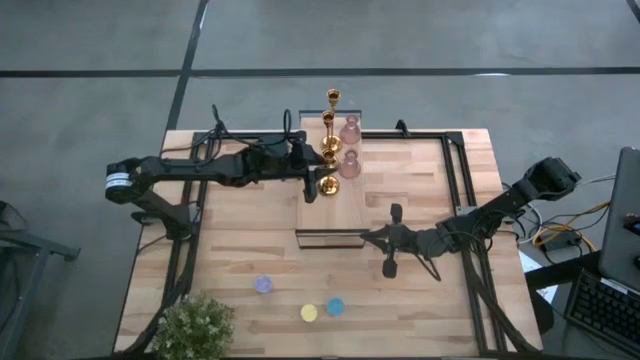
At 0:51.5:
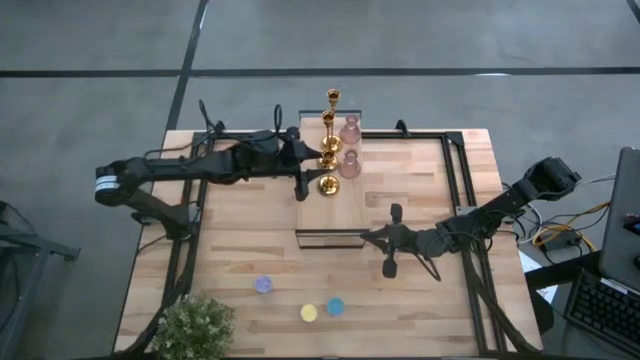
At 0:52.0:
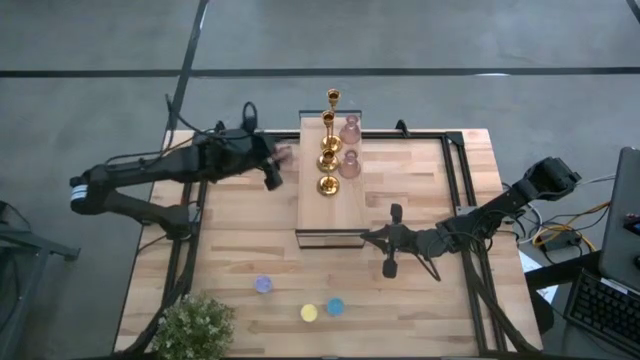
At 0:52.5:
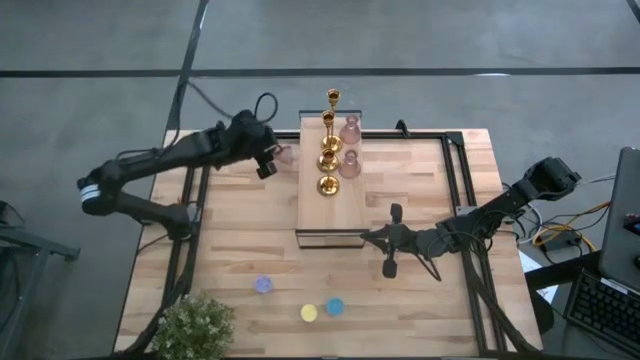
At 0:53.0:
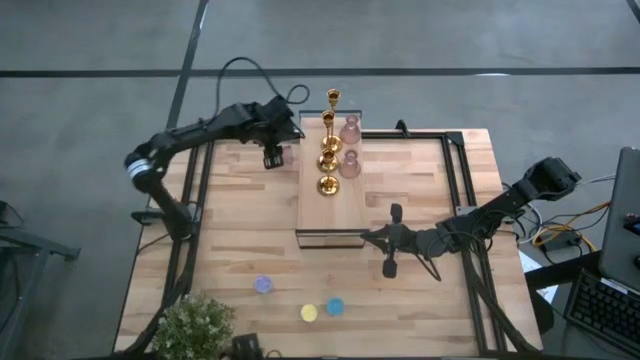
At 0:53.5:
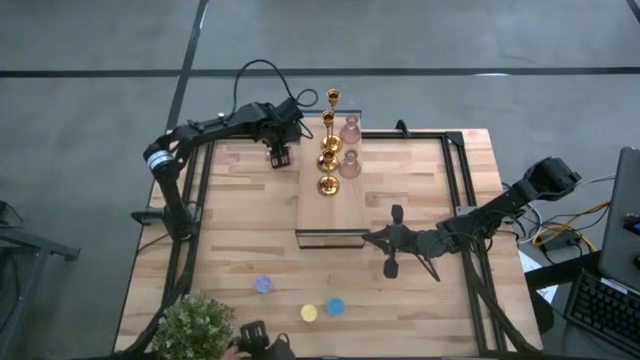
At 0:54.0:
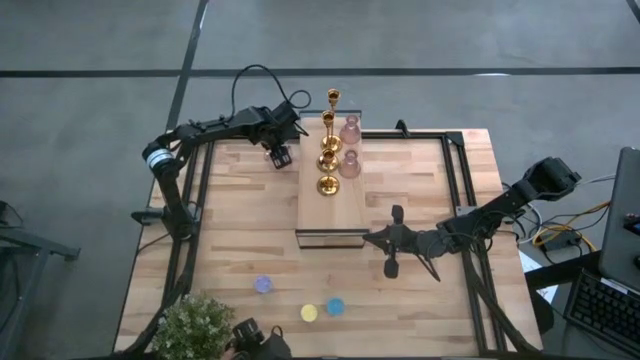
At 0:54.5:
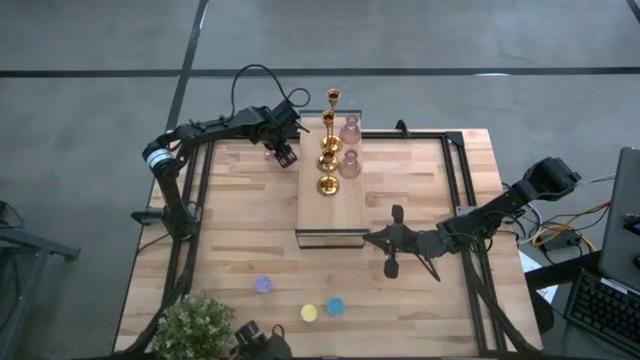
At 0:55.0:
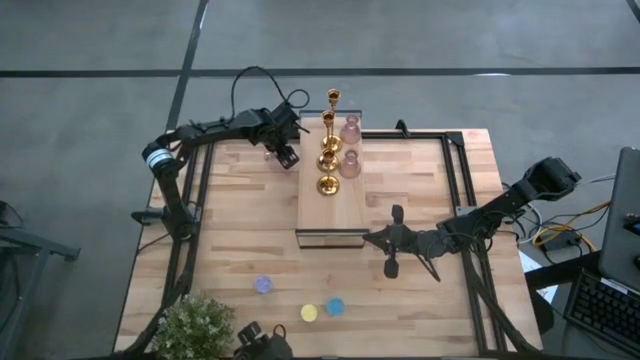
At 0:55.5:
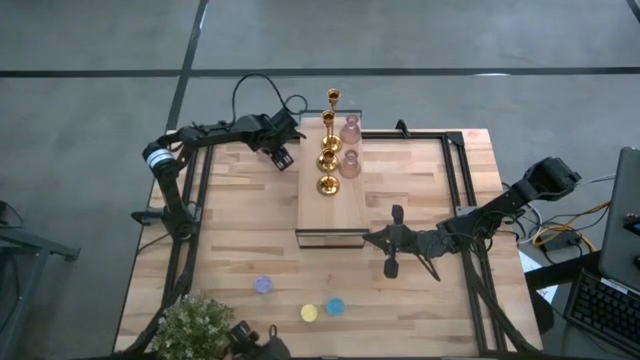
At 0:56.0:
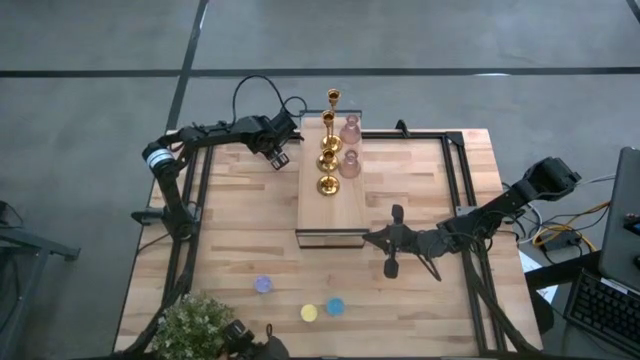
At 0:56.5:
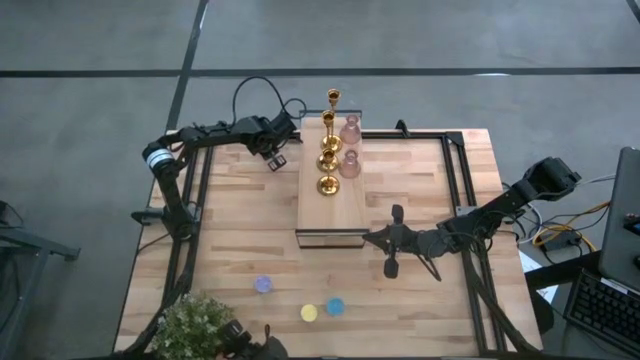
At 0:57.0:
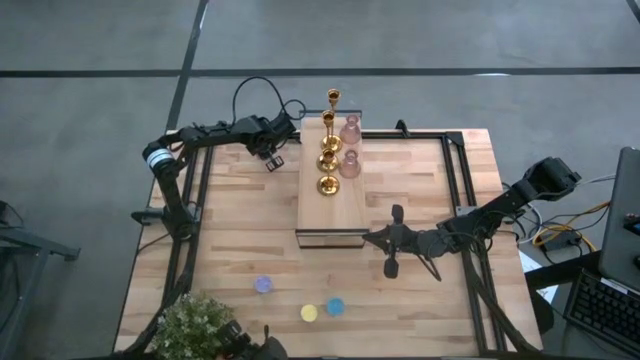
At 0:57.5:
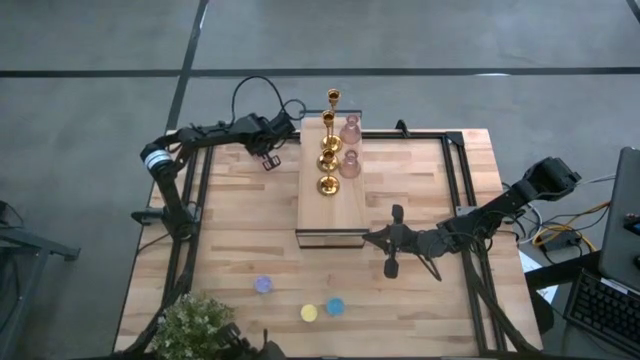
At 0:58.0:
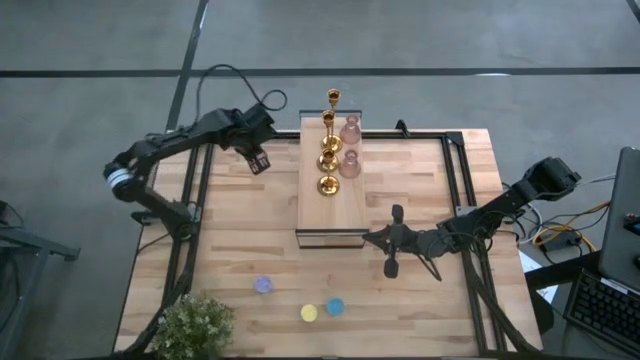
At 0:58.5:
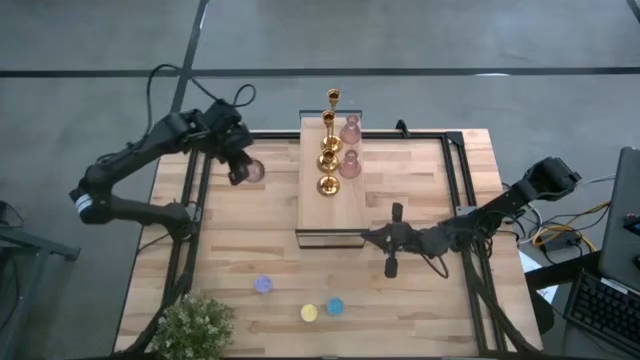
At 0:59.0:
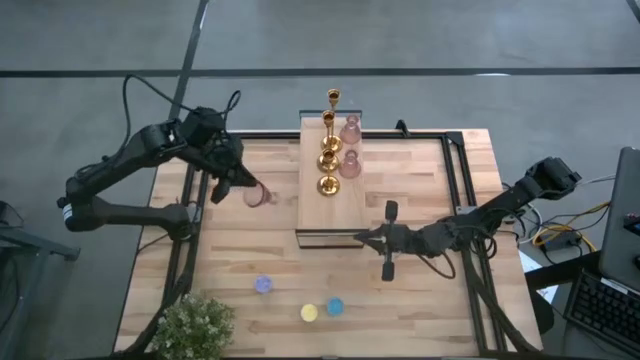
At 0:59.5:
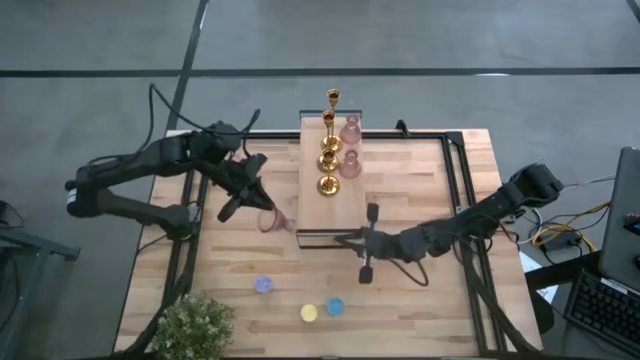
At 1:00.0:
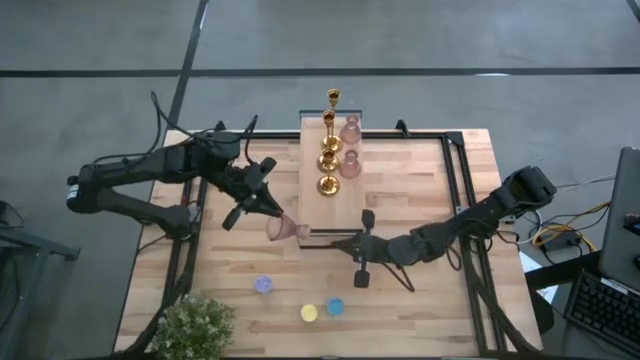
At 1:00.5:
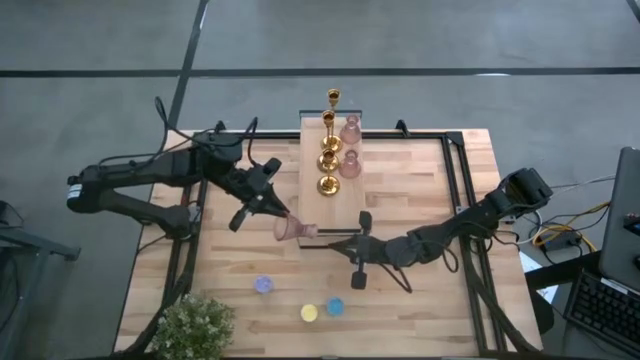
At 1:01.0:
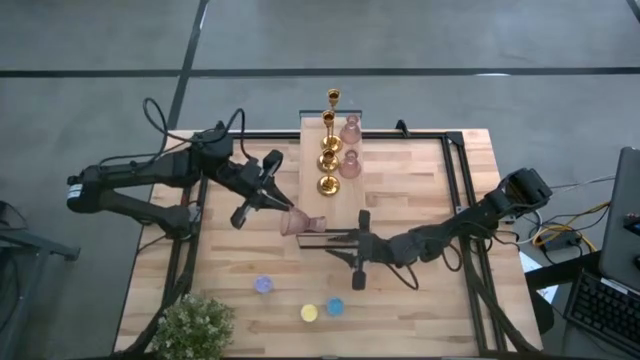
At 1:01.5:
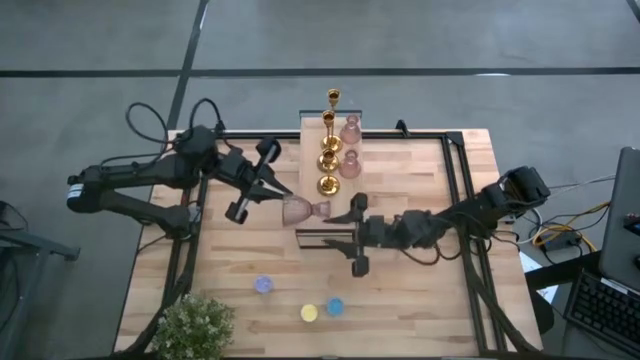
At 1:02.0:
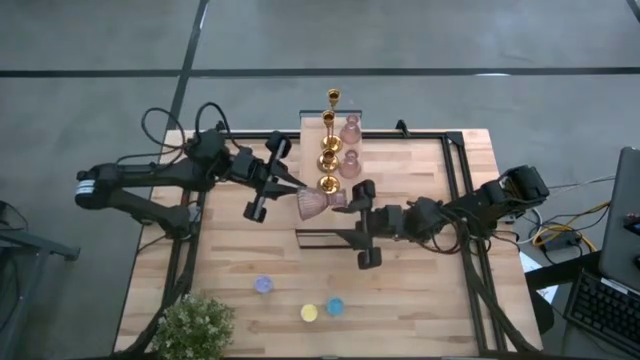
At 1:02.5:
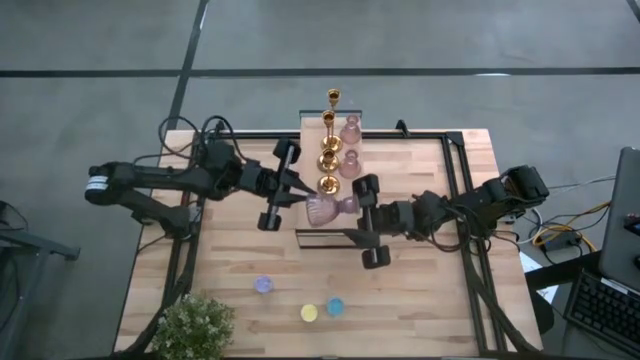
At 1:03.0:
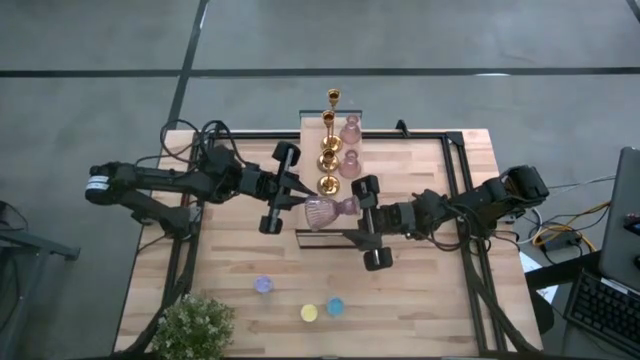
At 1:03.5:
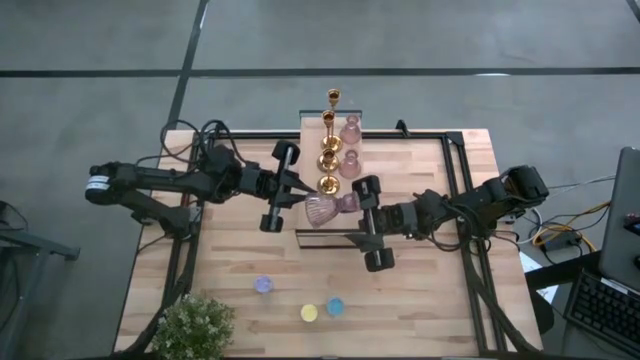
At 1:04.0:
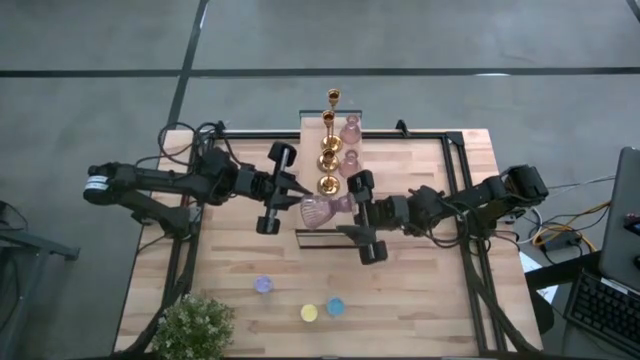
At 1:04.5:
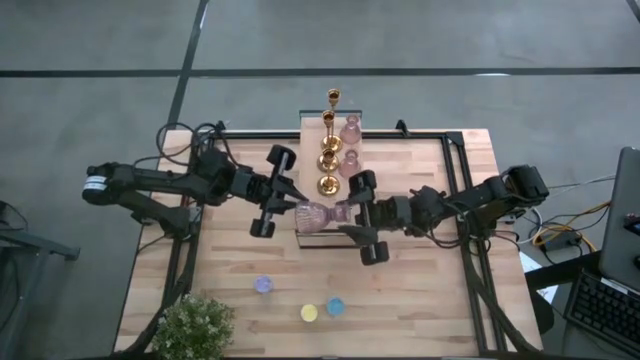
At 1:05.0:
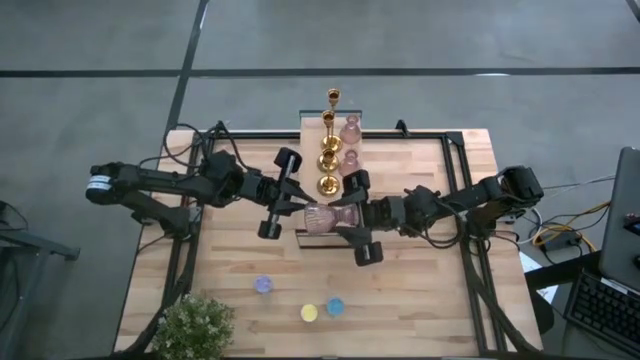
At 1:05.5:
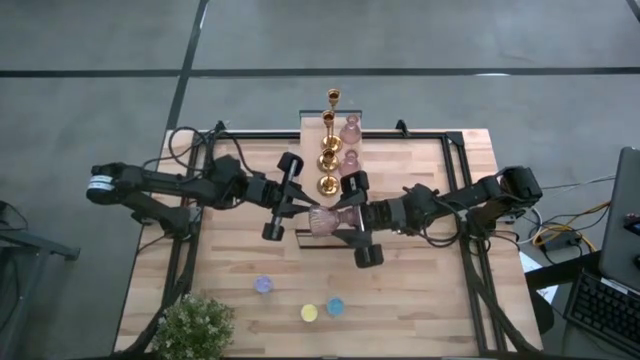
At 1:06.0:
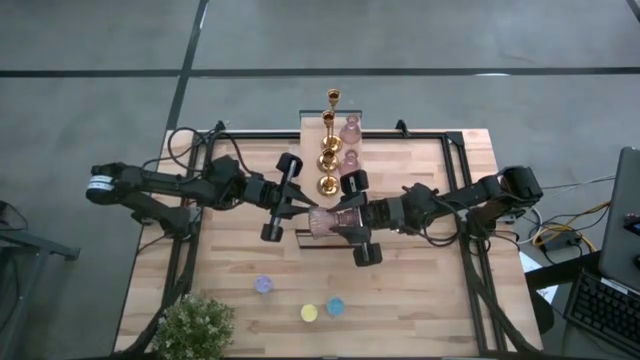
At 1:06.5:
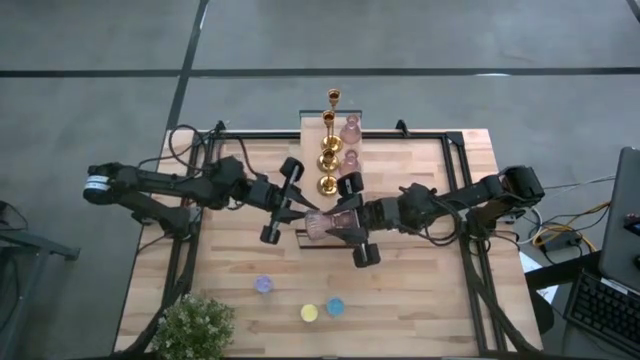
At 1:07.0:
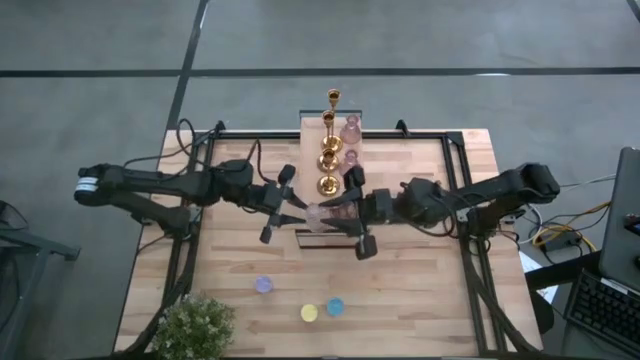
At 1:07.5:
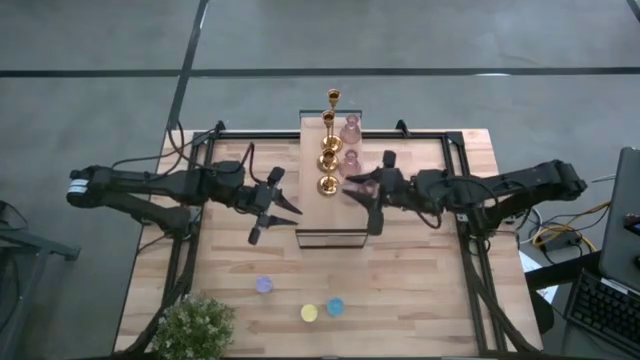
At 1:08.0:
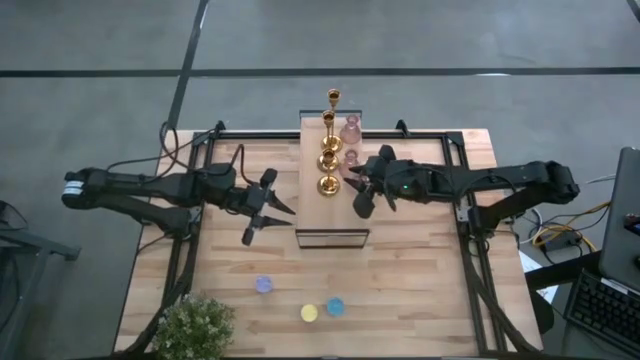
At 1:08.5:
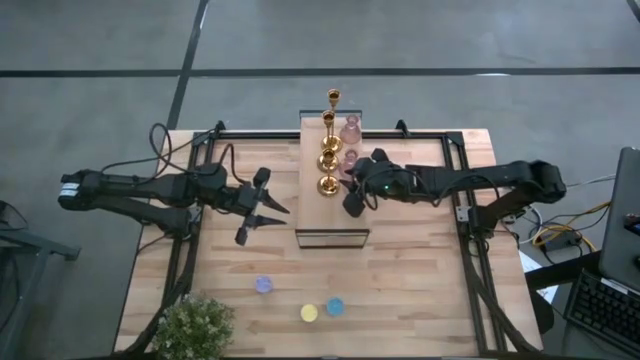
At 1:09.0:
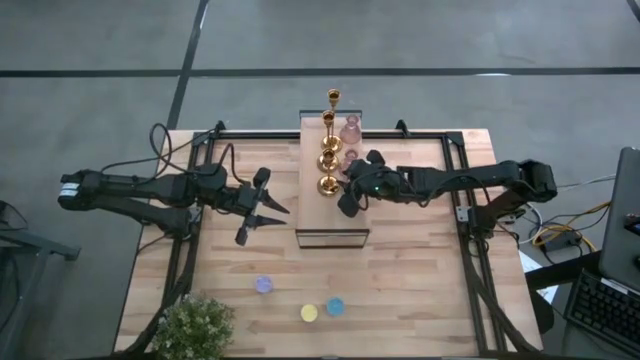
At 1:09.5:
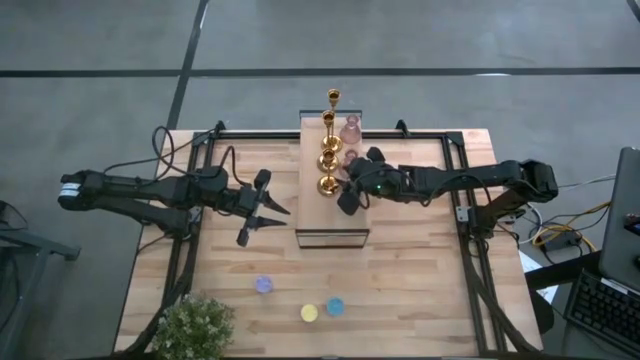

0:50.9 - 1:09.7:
Task: Pick & Place candle stick holders
Put the purple glass candle holder on the shelf
